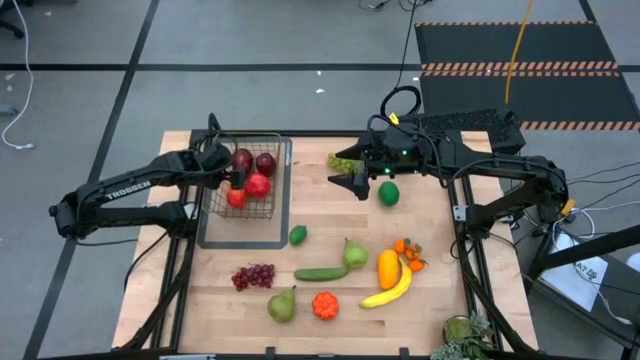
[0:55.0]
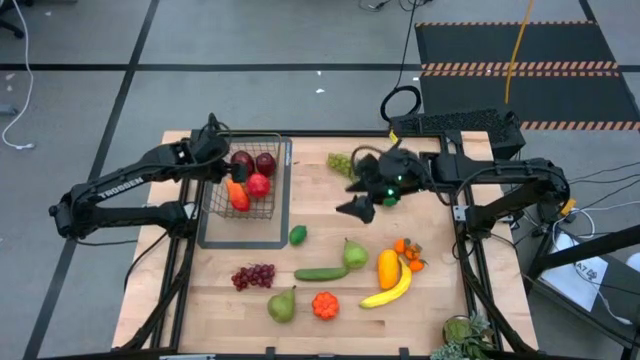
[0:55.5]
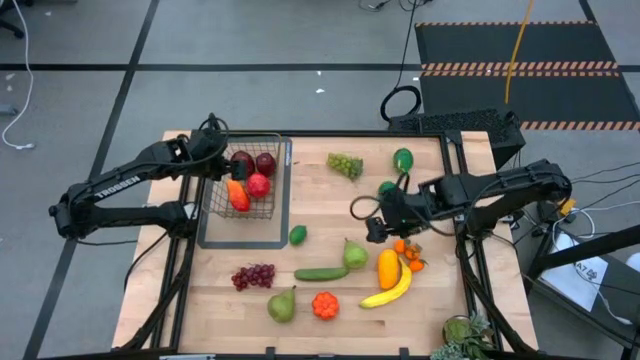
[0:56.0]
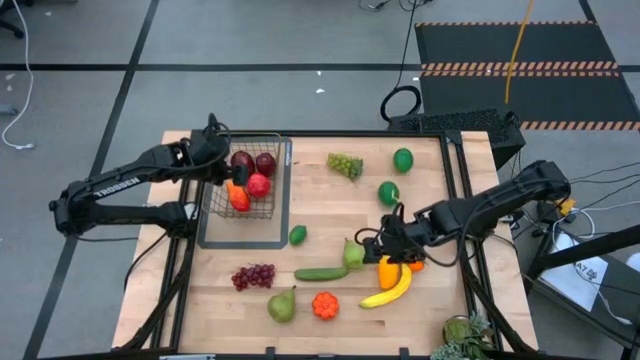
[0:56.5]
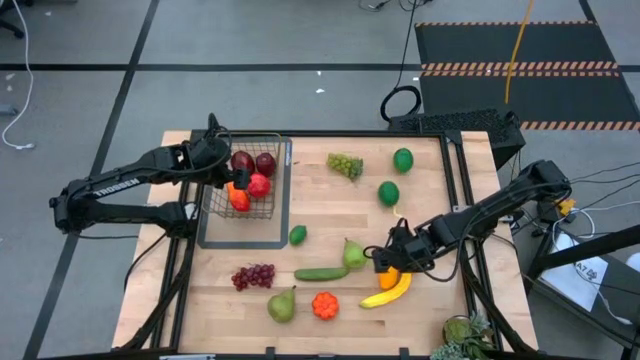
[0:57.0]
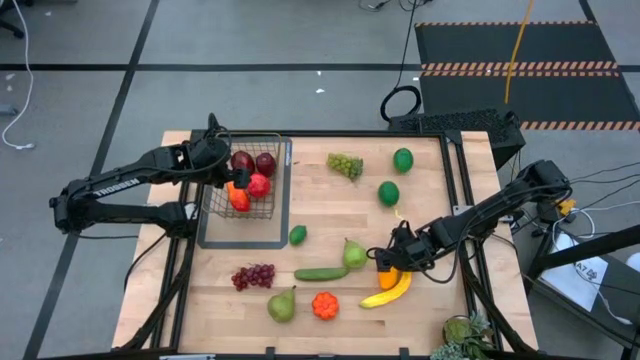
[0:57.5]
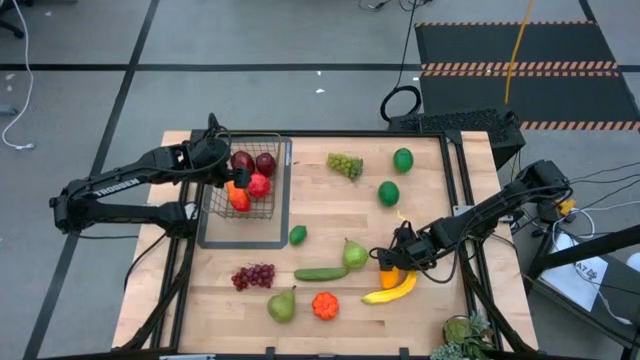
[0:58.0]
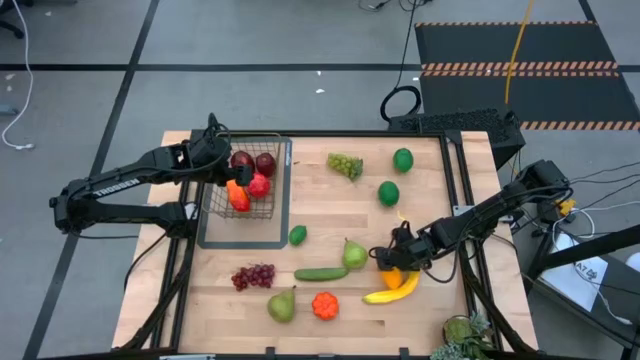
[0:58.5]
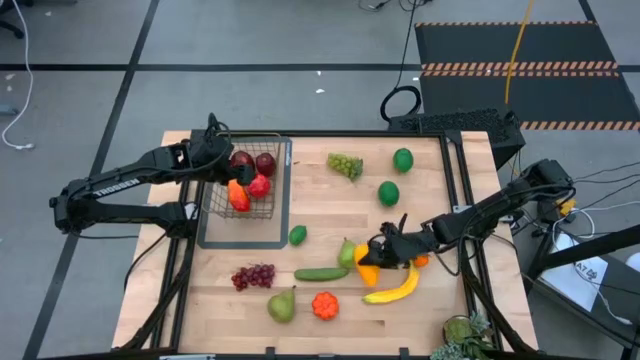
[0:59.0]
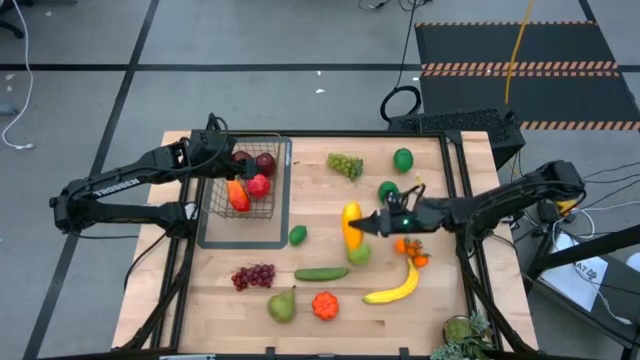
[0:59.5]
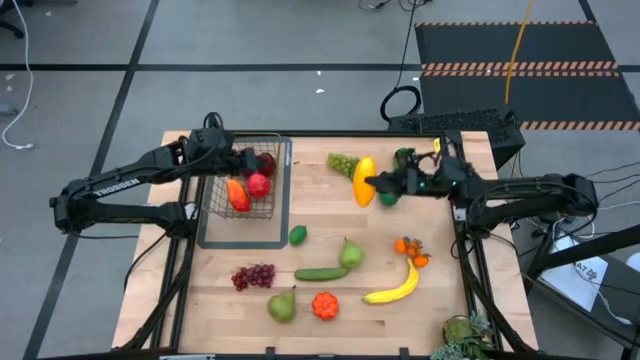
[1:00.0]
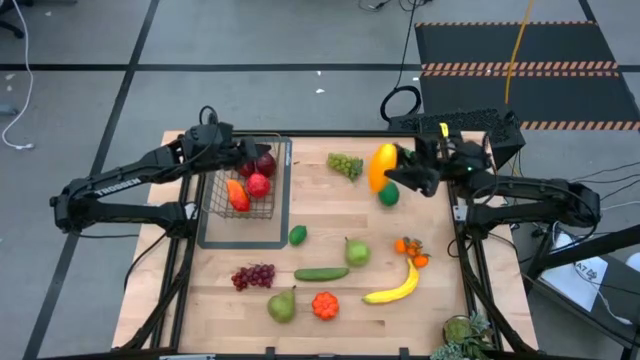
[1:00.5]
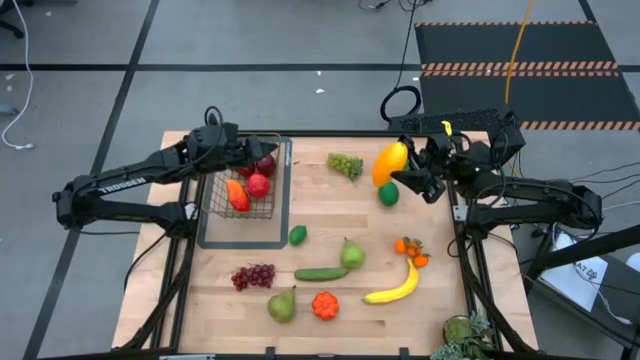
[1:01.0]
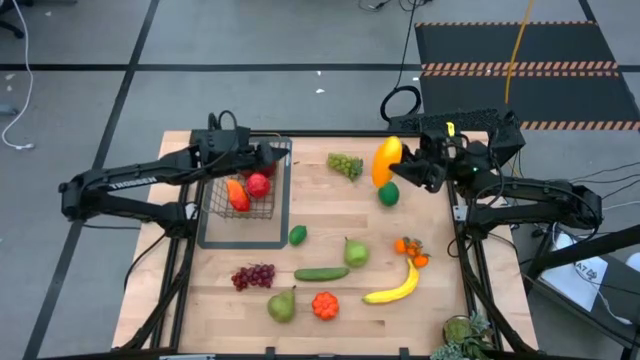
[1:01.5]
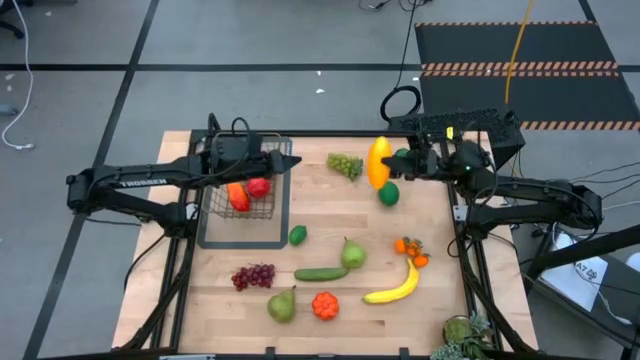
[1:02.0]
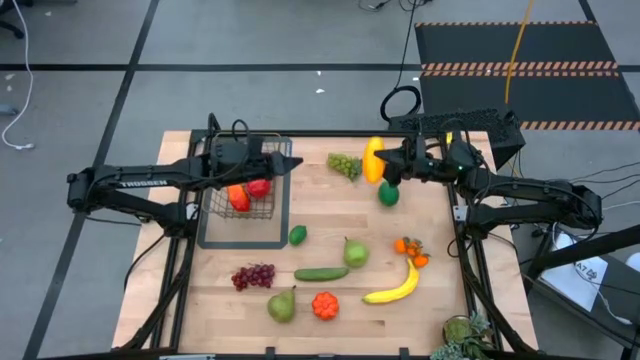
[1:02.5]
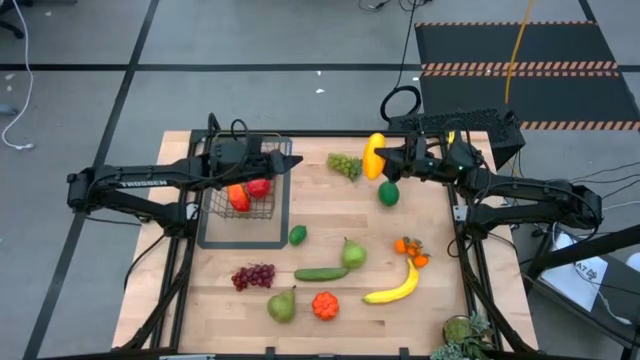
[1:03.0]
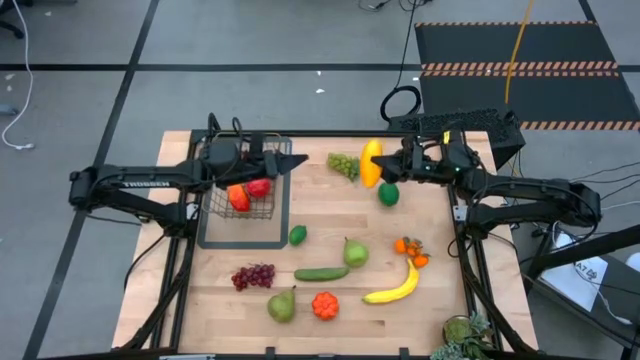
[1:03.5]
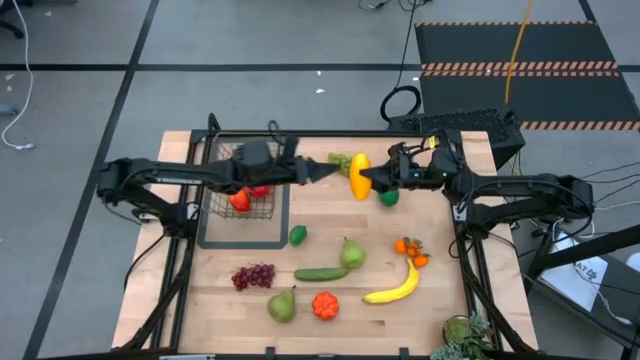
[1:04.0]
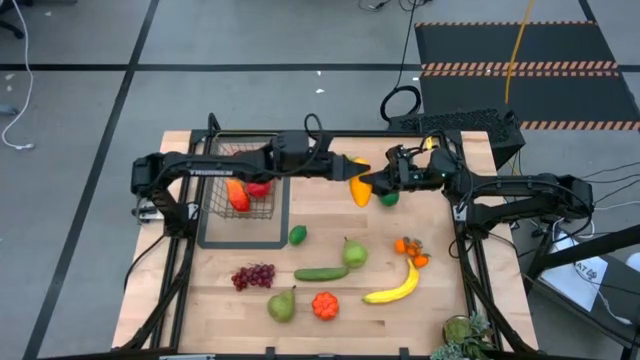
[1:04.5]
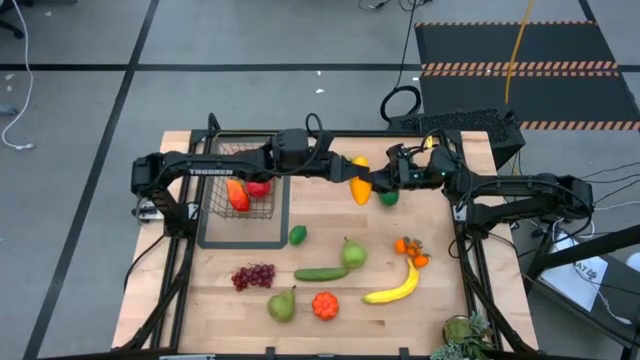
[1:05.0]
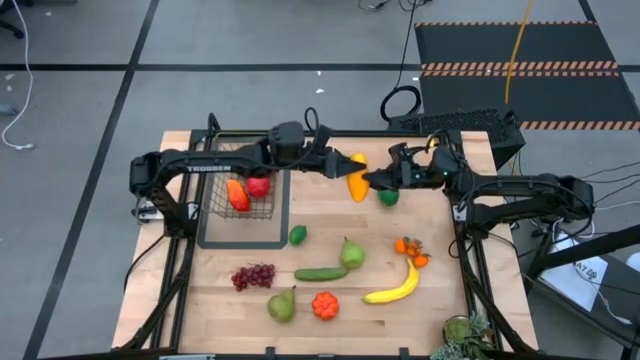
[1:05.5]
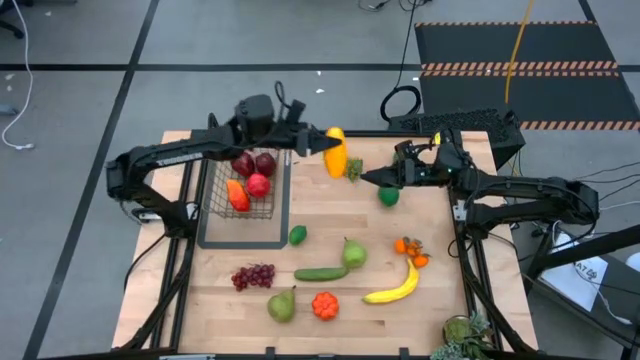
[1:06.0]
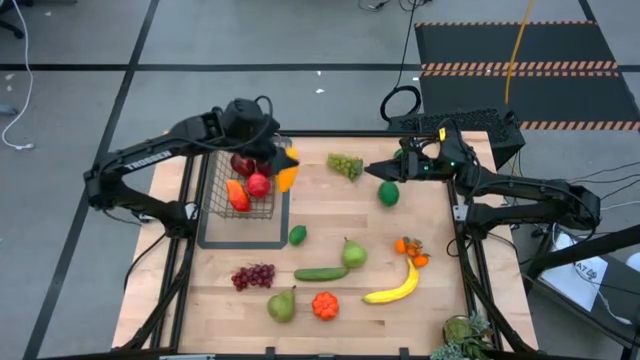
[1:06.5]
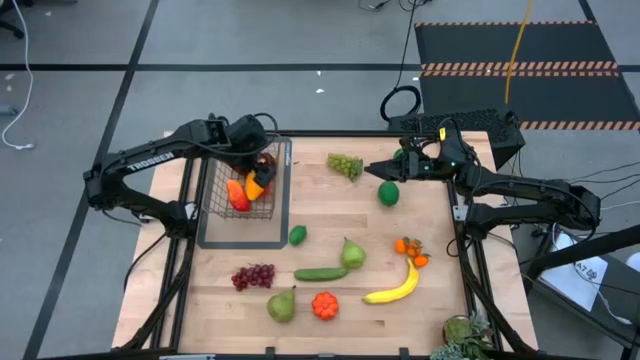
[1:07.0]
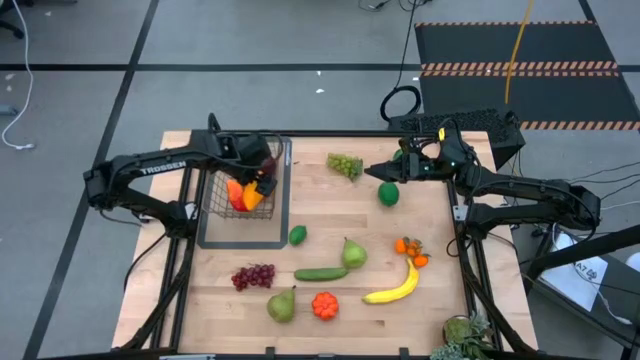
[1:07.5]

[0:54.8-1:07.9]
Task: Build produce basket
Put the mango into the wire basket

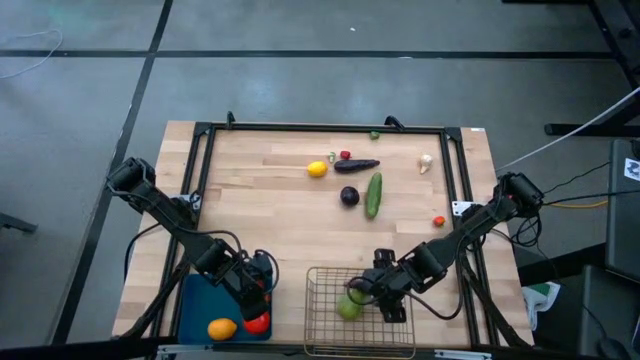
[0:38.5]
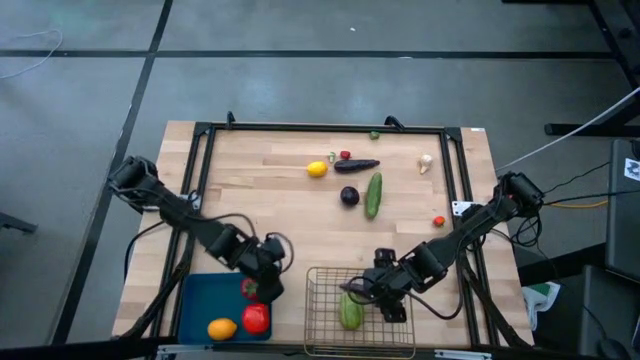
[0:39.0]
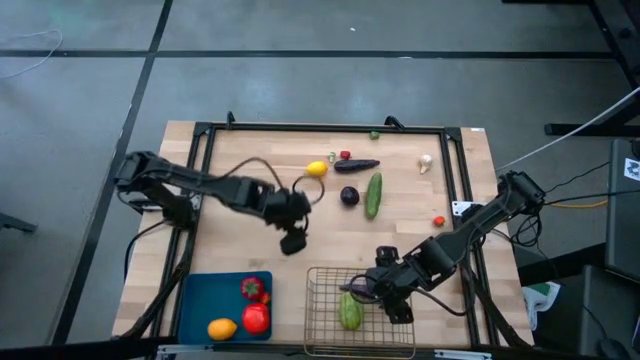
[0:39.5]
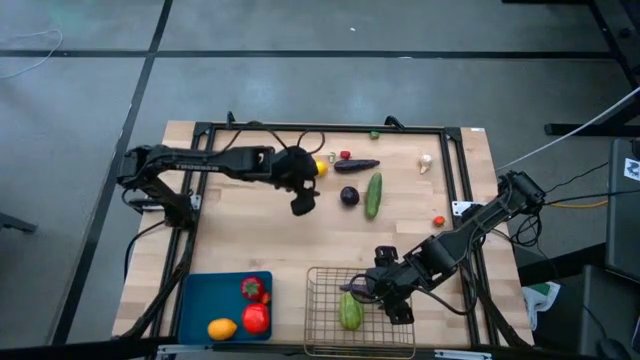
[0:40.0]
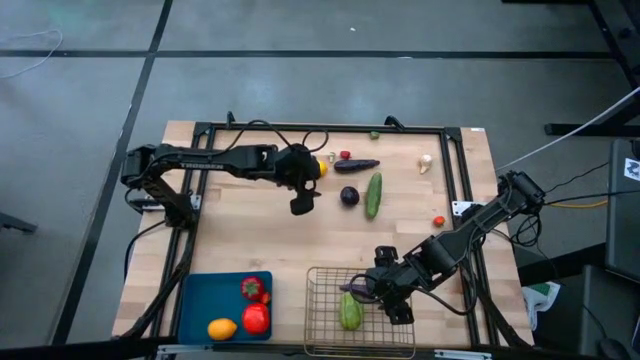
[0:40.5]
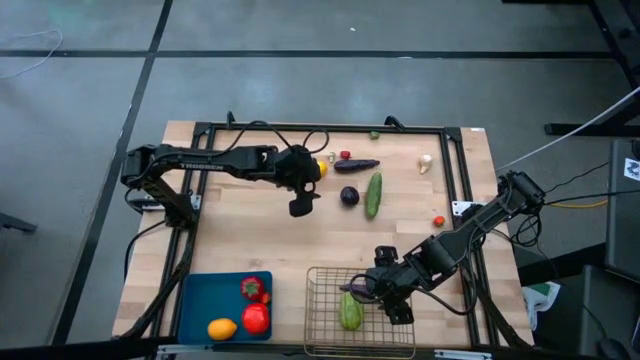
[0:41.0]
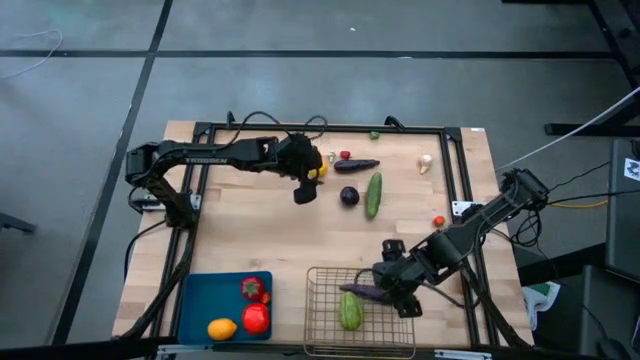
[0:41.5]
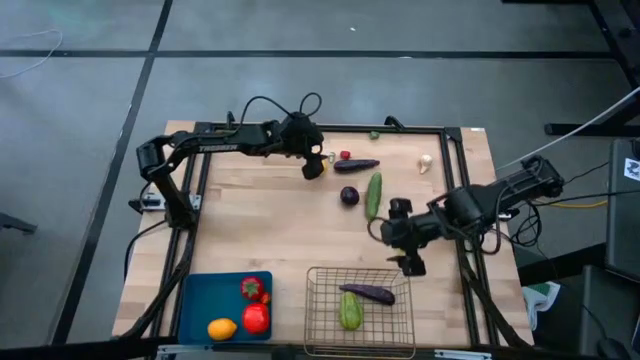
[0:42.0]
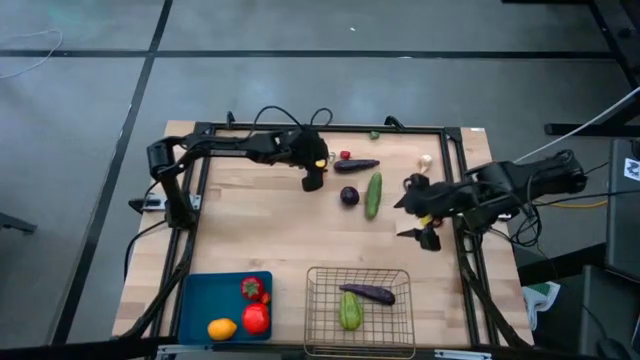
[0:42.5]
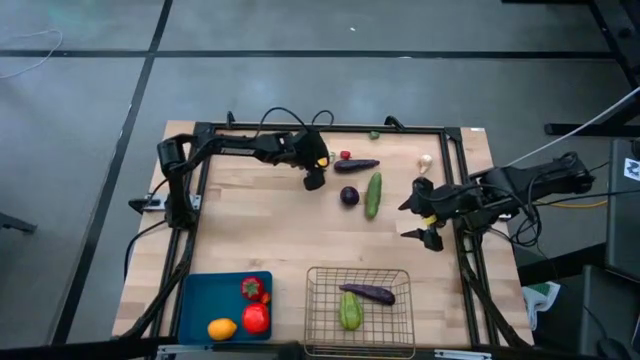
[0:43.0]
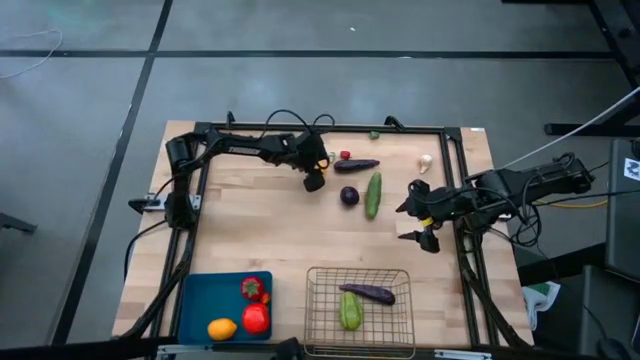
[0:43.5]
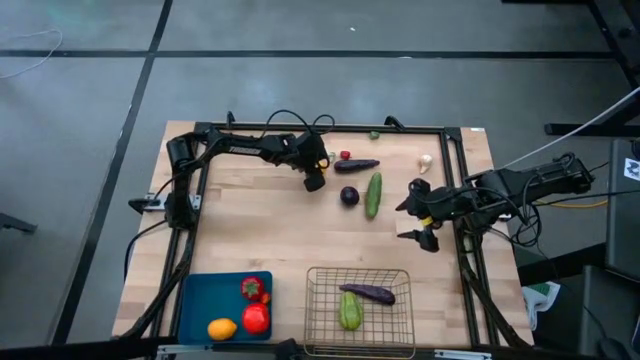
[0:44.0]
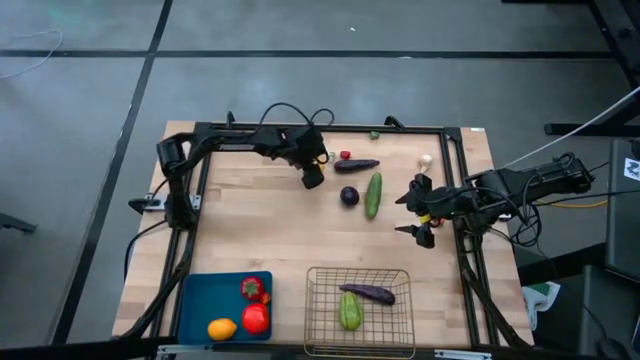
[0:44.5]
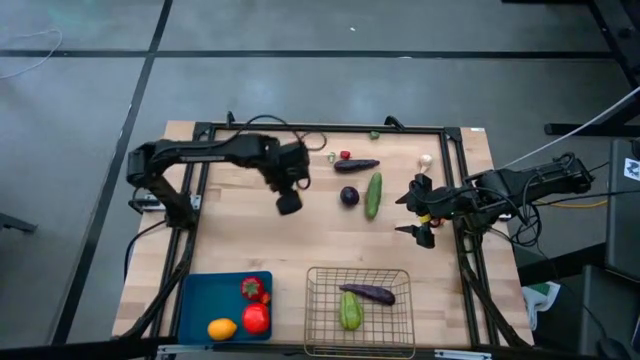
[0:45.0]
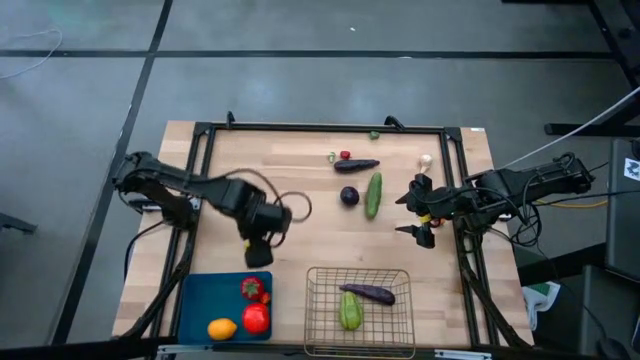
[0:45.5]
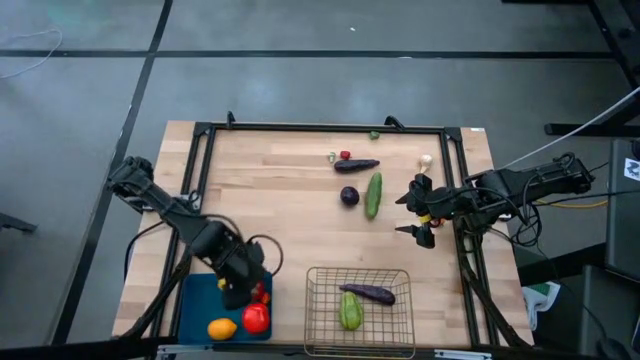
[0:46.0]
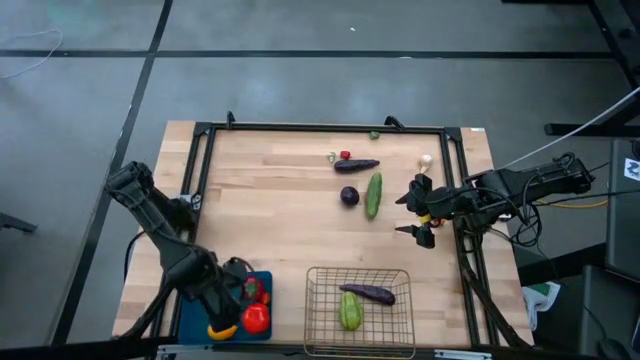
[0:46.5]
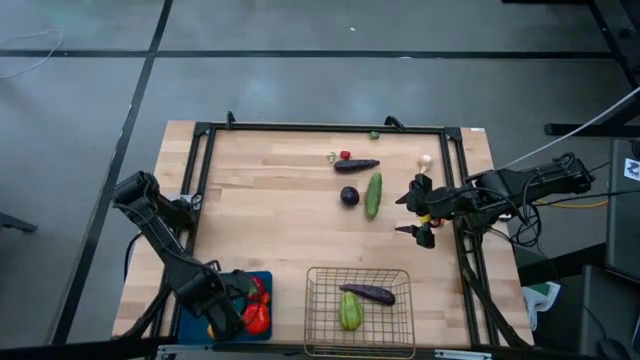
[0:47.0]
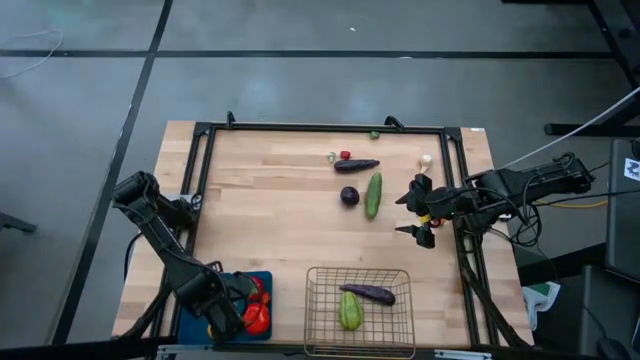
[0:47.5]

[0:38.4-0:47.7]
Task: Sort produce into baskets
Put the lemon into the blue bin
